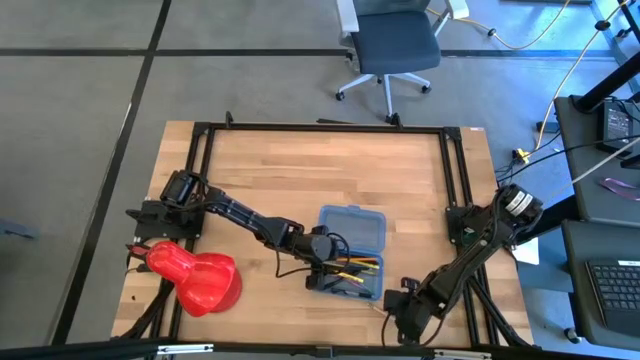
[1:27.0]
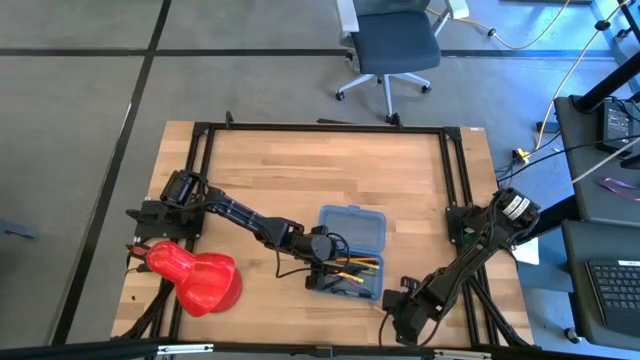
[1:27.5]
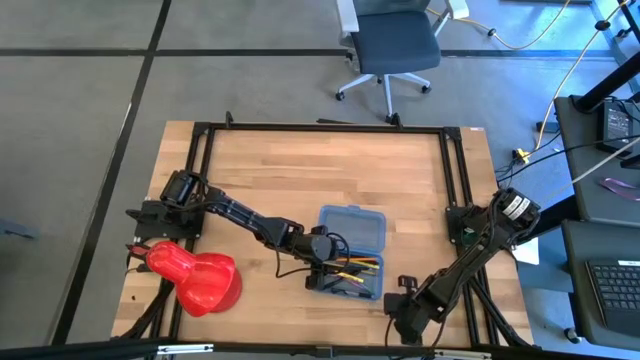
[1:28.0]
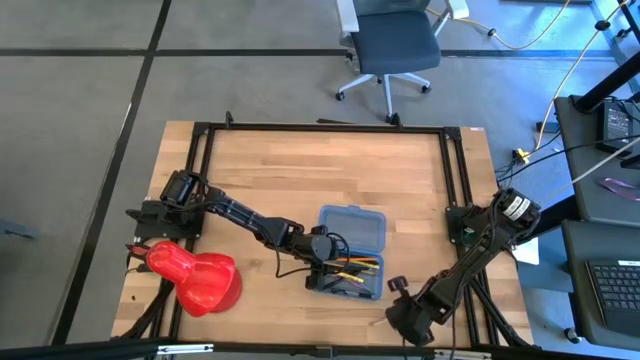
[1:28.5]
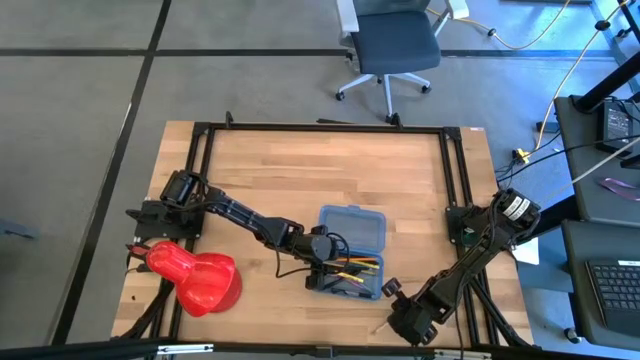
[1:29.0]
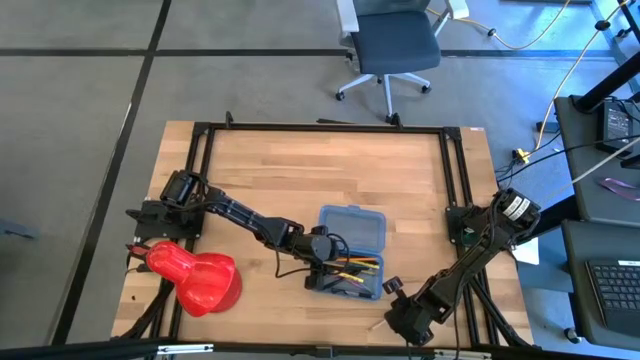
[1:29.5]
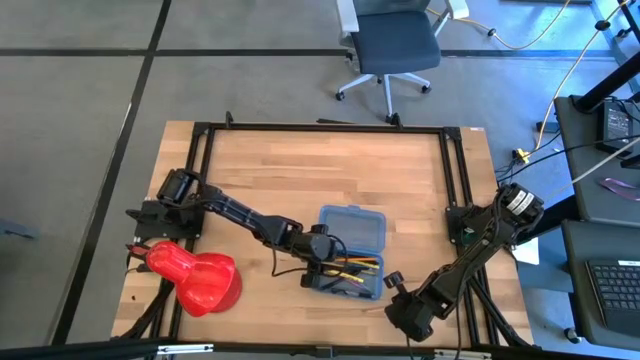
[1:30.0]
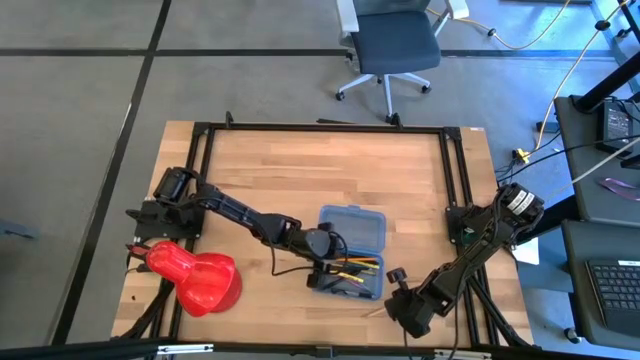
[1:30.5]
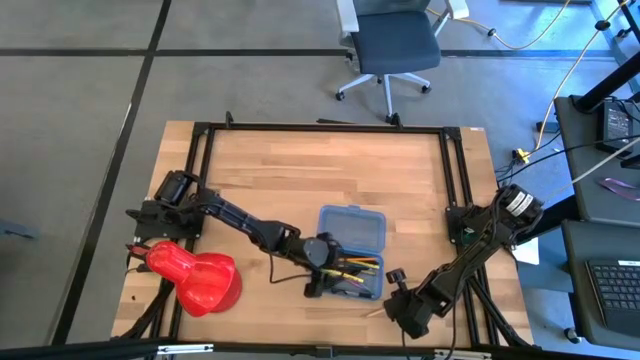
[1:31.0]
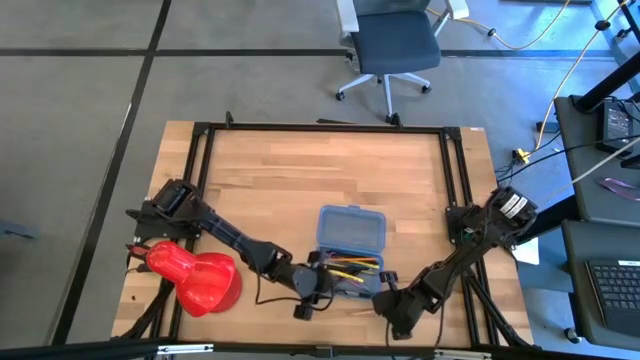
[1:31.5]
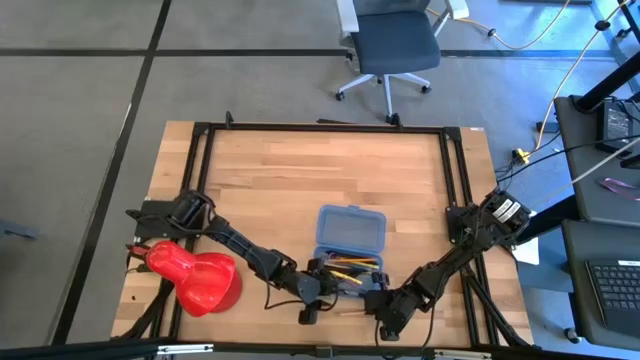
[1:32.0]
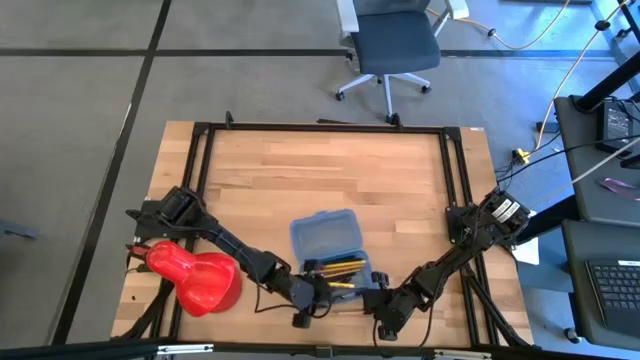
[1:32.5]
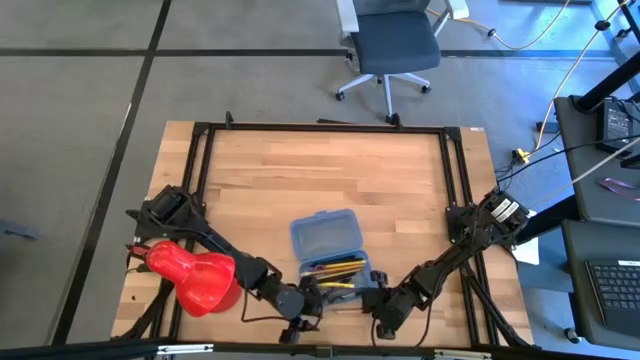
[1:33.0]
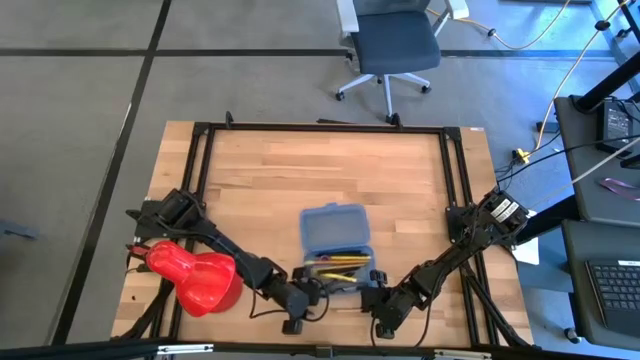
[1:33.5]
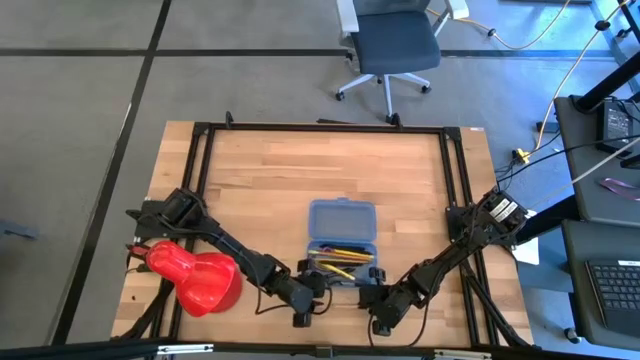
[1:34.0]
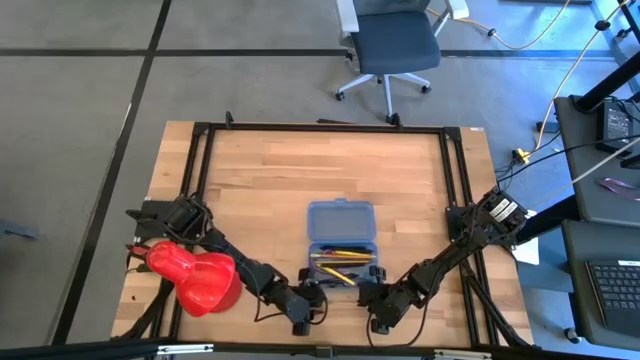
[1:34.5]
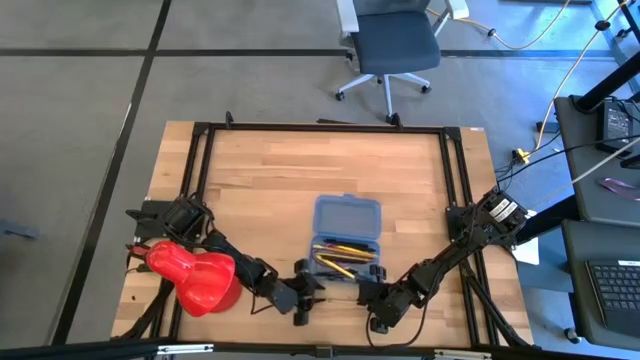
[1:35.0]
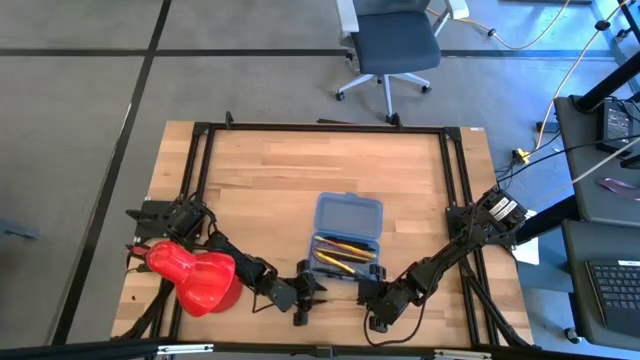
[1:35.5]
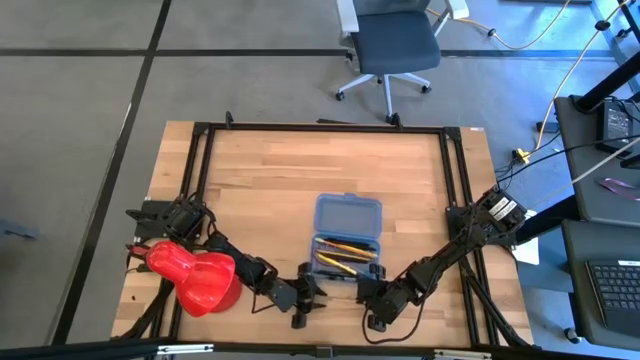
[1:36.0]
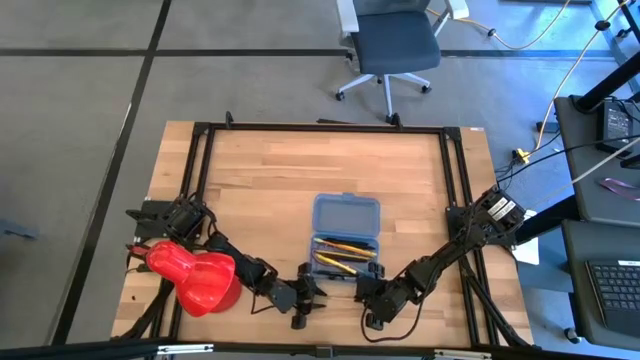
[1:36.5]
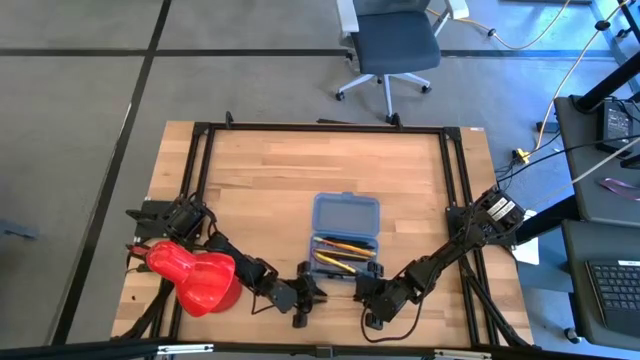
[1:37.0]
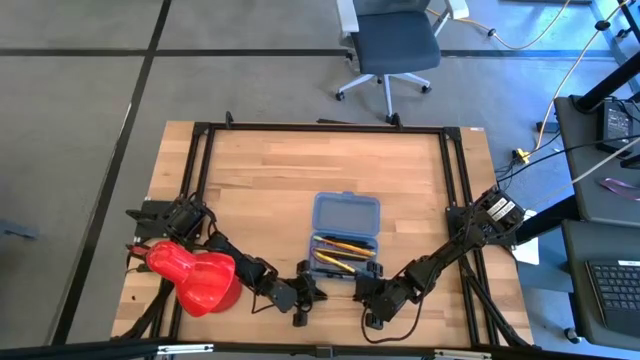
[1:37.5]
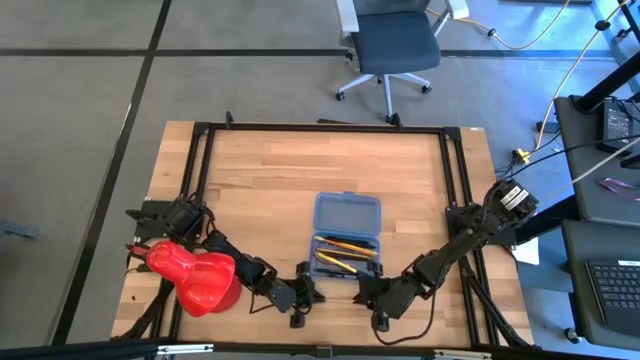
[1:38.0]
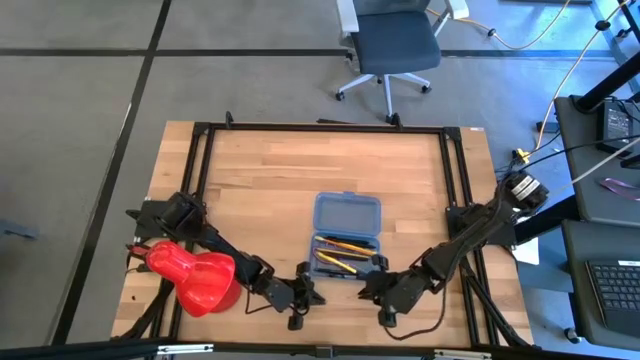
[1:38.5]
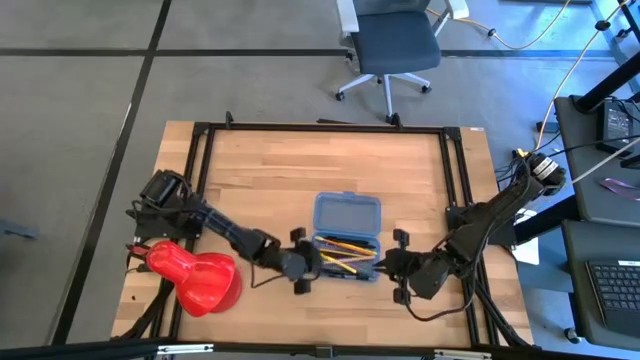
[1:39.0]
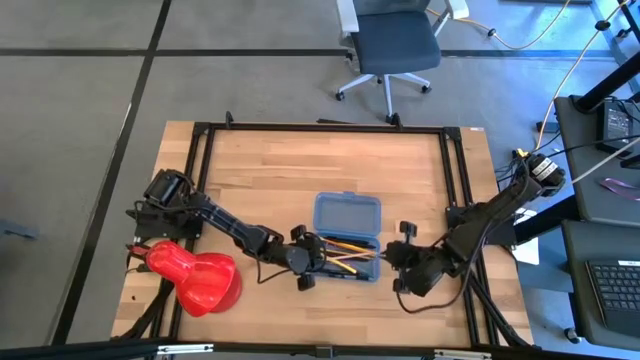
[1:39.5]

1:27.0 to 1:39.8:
Task: Pick & place school supplies into a supply box
Put the bottom right white pencil into the blue supply box

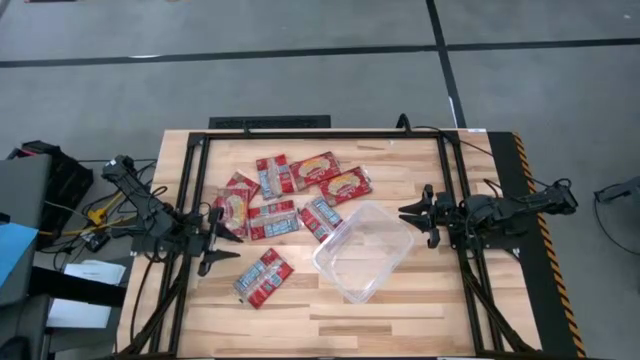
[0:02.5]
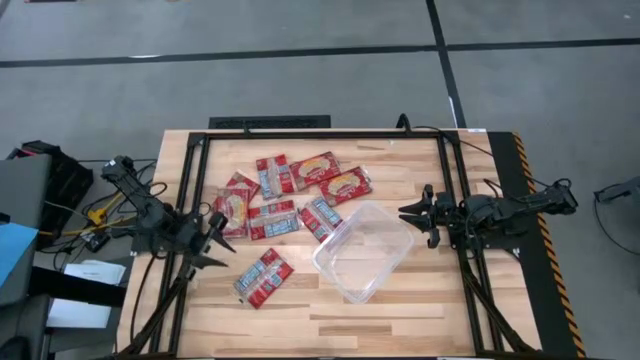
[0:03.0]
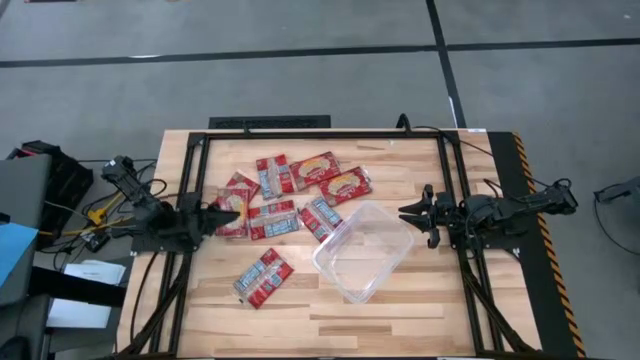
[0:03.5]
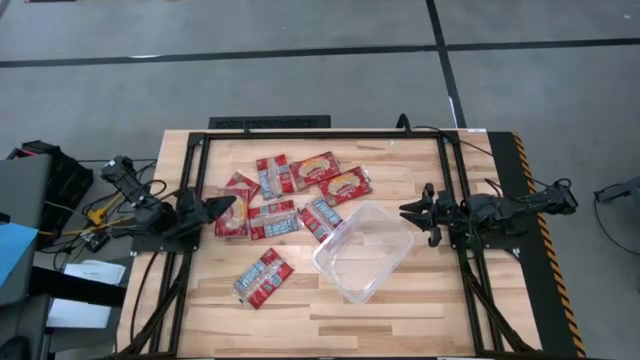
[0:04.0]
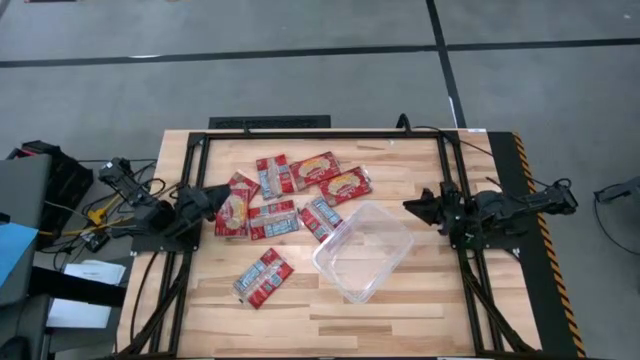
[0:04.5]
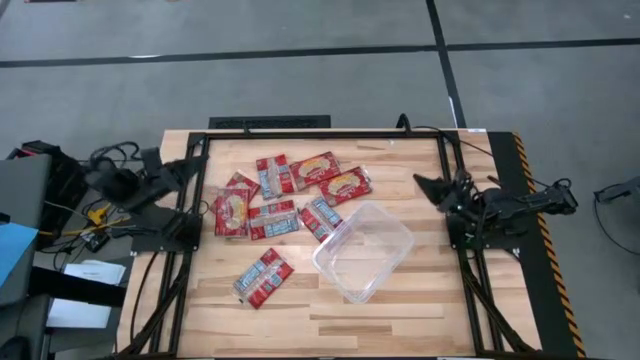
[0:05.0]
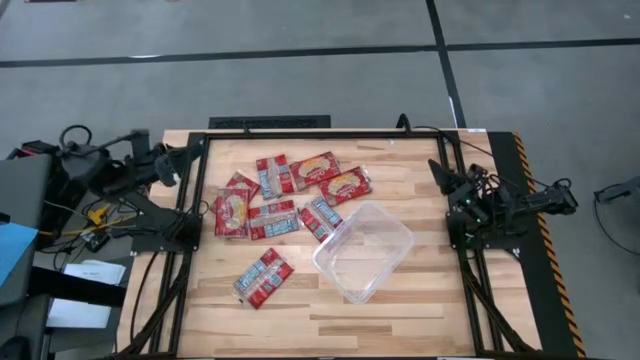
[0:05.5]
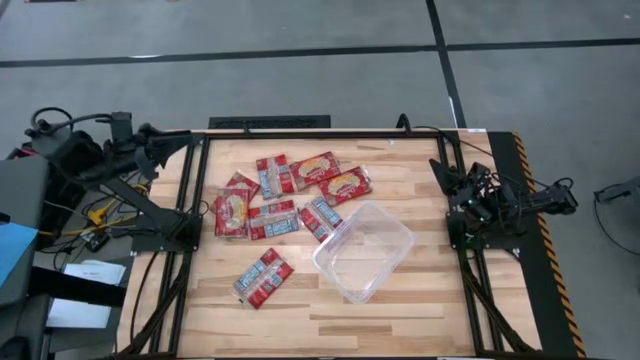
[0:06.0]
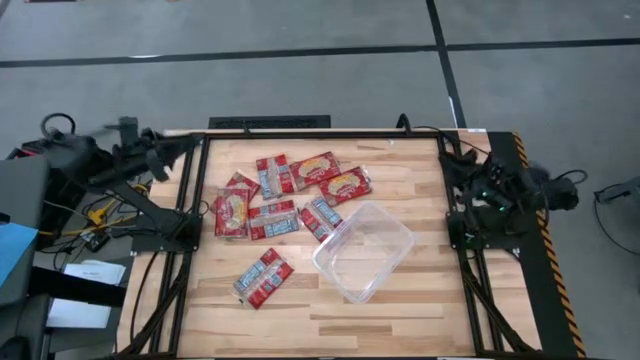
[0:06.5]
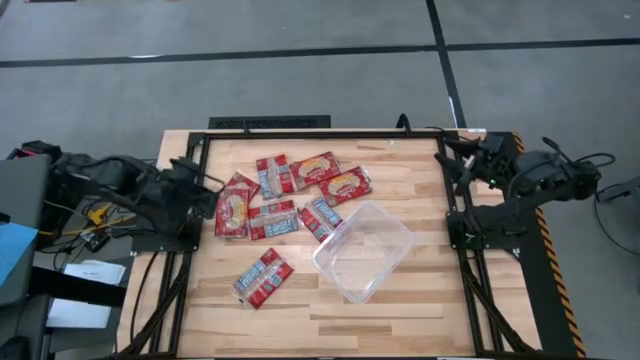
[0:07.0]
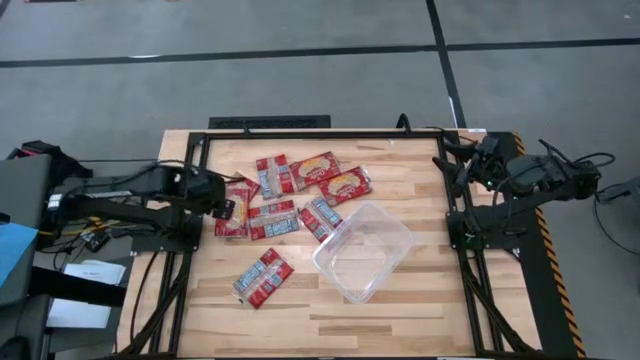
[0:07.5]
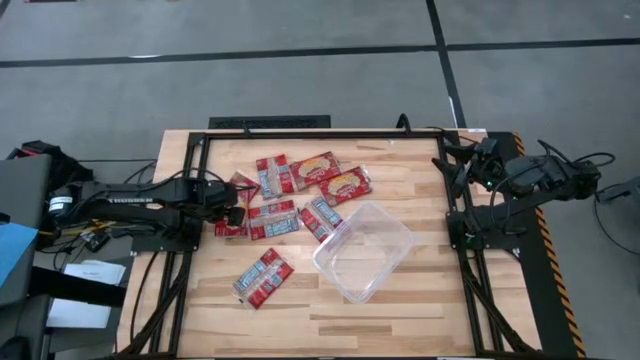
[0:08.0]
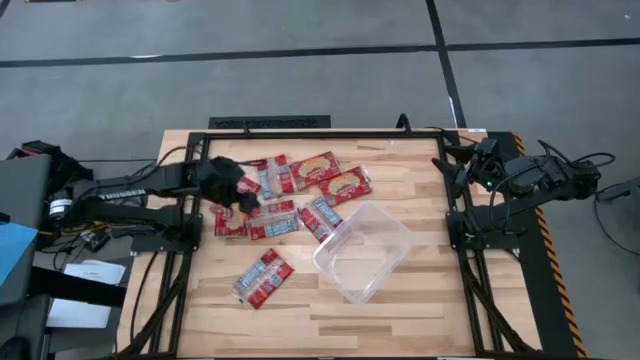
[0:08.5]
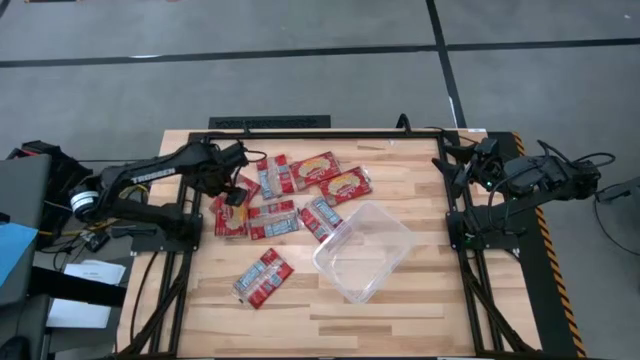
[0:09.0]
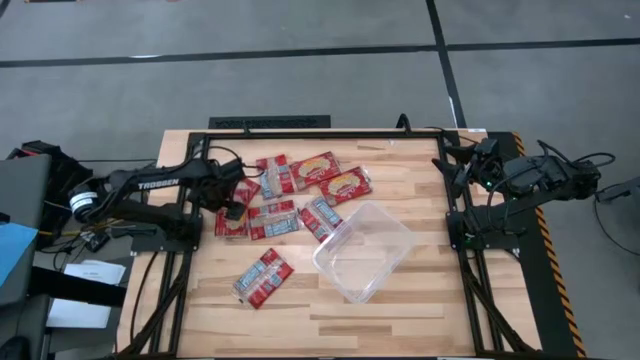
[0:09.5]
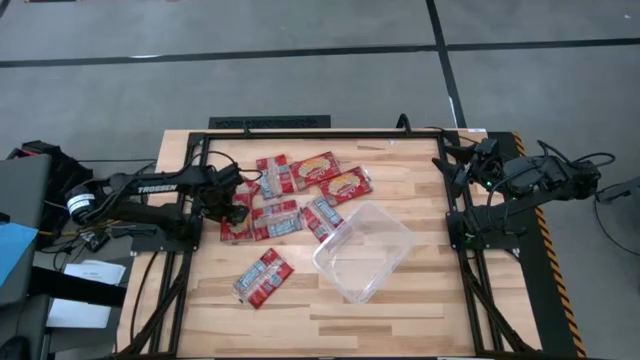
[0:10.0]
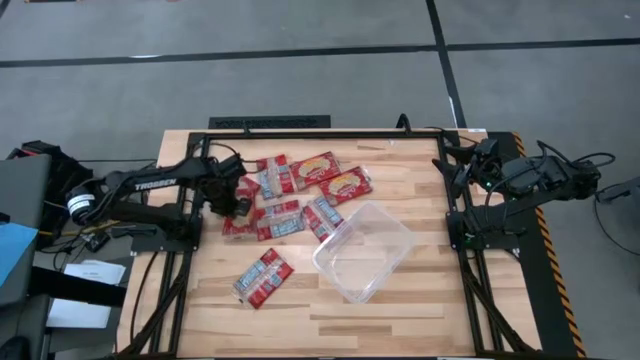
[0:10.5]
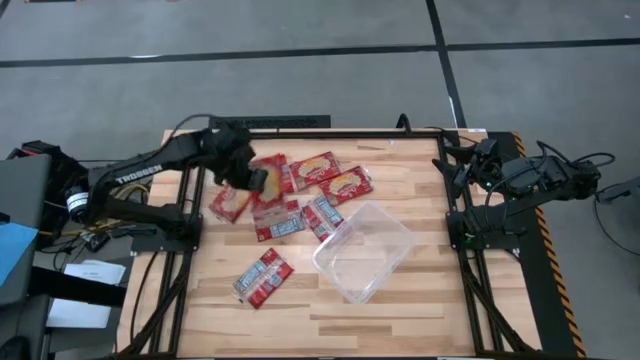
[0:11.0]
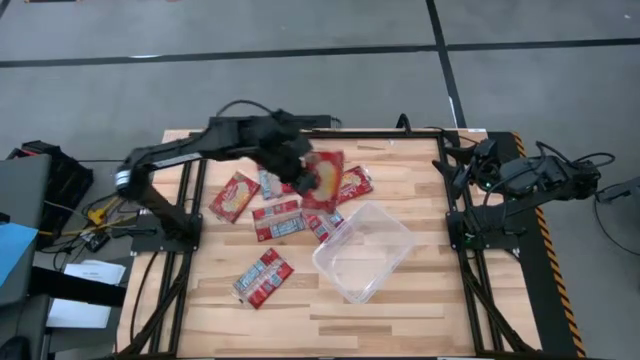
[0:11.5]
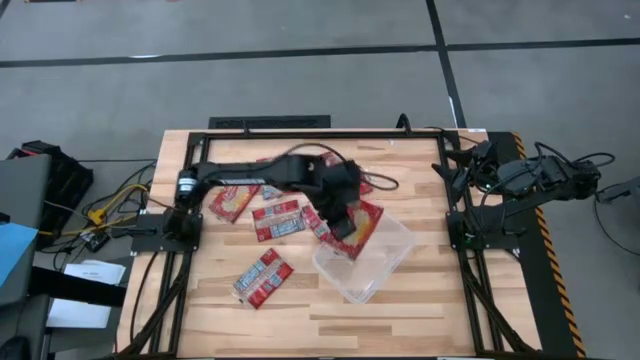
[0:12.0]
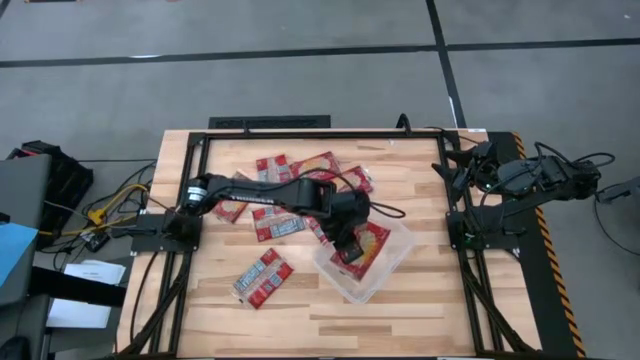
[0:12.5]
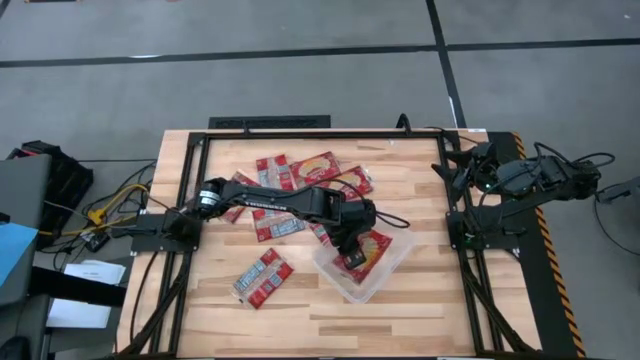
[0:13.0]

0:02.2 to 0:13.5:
Task: Sort popcorn bags into baskets
Put the red popcorn pack into the transparent container
